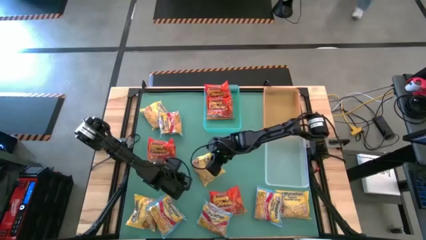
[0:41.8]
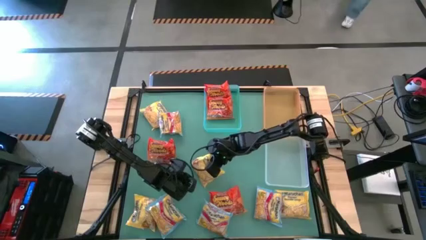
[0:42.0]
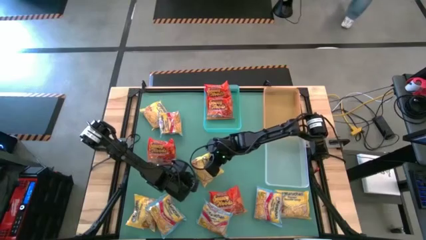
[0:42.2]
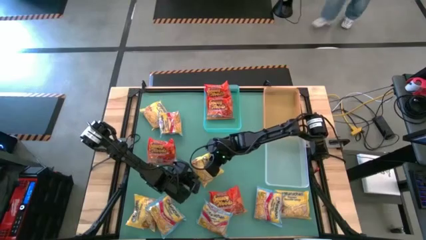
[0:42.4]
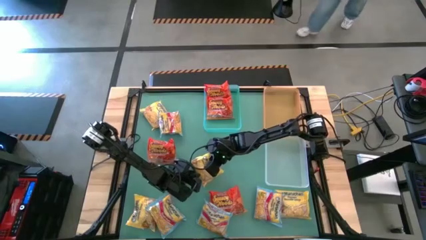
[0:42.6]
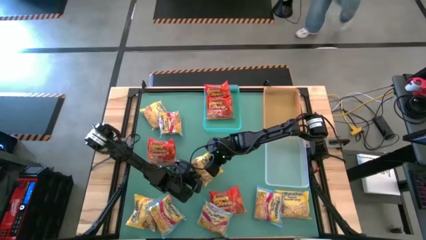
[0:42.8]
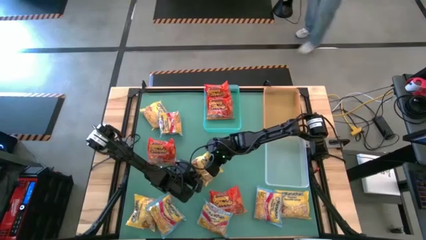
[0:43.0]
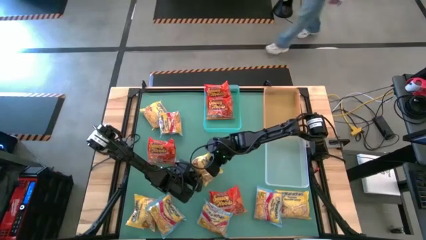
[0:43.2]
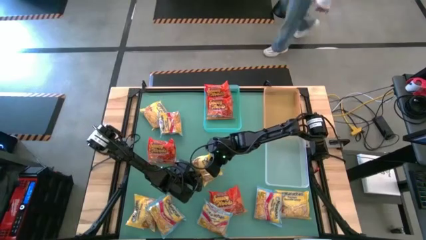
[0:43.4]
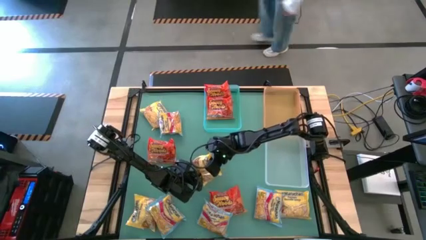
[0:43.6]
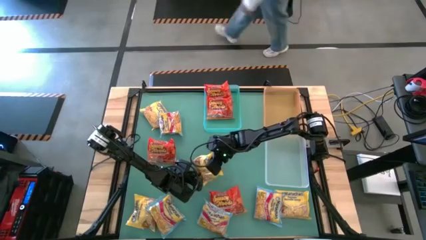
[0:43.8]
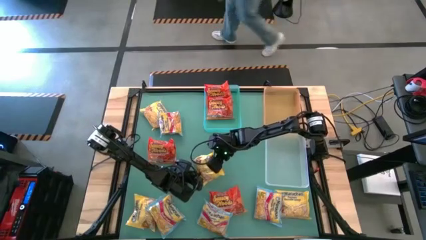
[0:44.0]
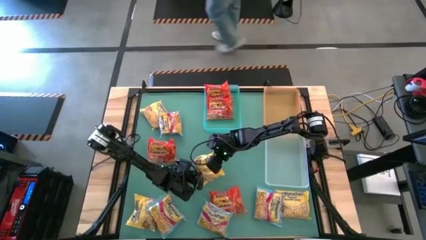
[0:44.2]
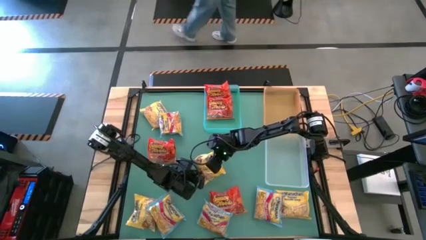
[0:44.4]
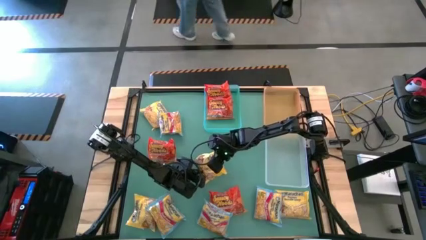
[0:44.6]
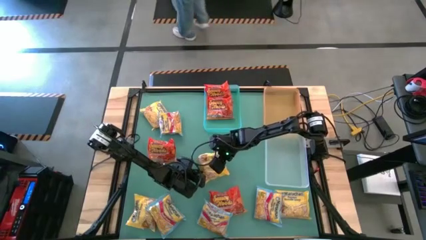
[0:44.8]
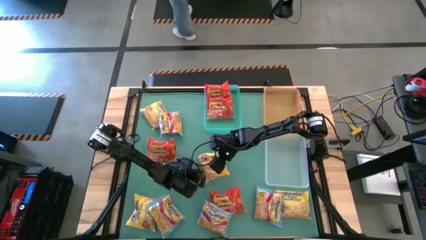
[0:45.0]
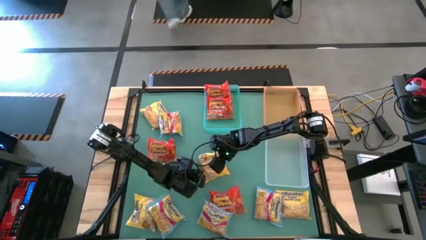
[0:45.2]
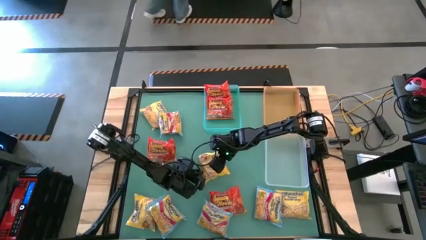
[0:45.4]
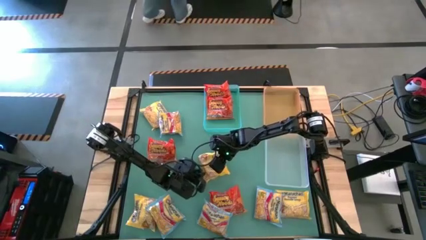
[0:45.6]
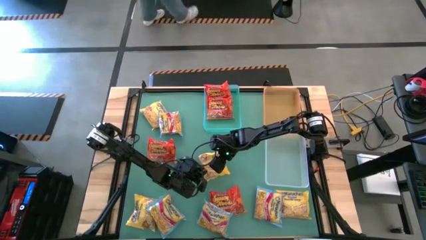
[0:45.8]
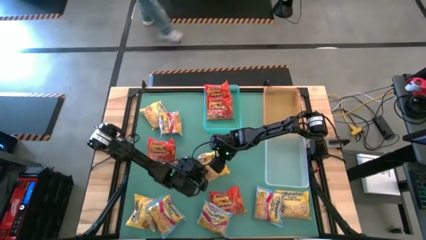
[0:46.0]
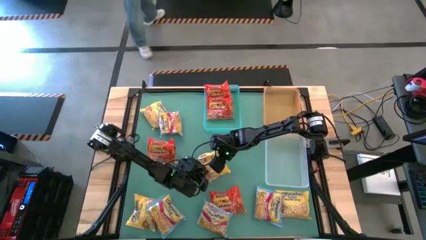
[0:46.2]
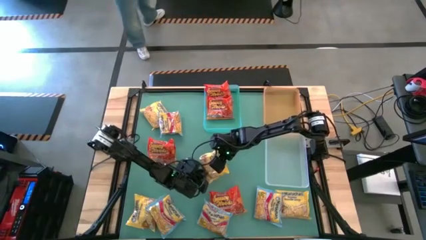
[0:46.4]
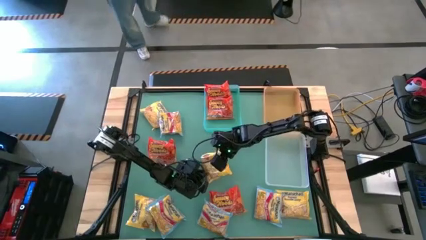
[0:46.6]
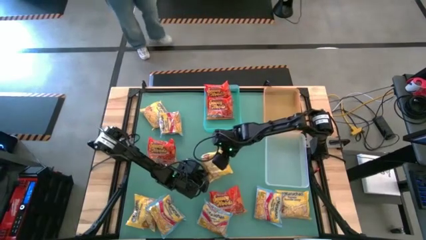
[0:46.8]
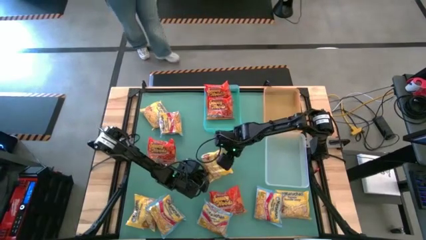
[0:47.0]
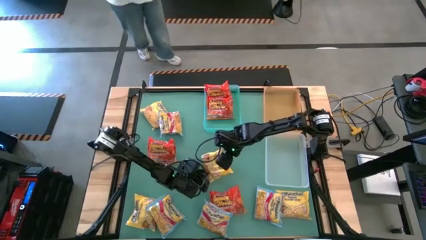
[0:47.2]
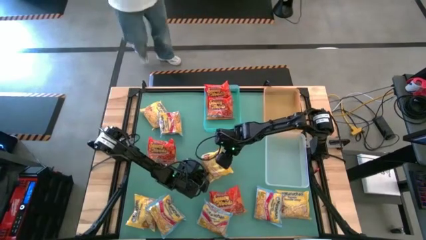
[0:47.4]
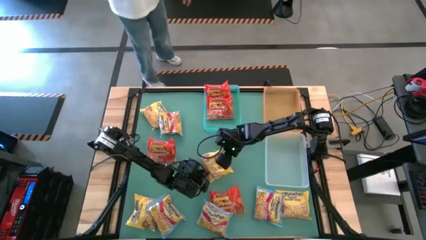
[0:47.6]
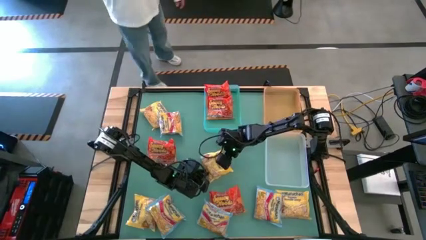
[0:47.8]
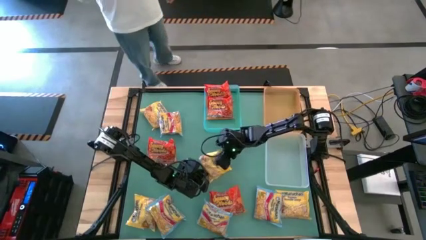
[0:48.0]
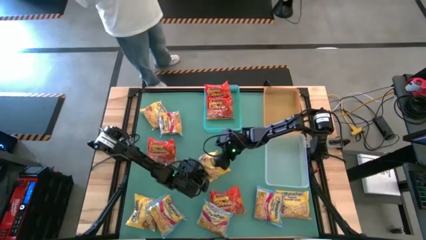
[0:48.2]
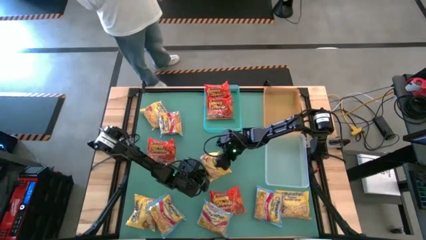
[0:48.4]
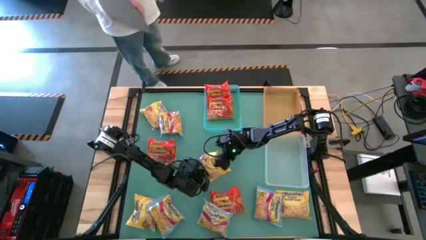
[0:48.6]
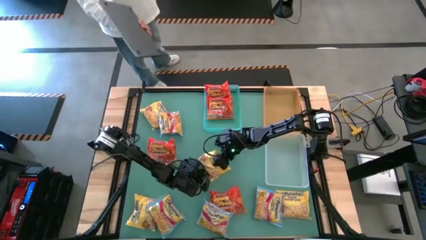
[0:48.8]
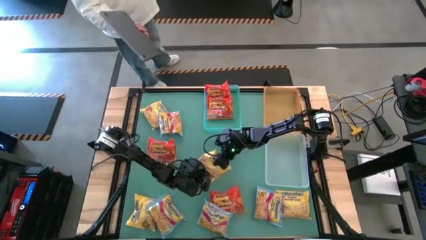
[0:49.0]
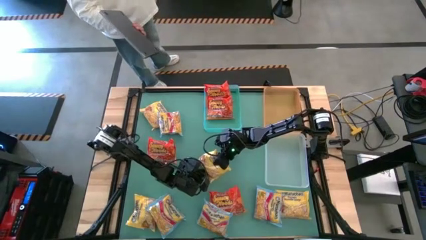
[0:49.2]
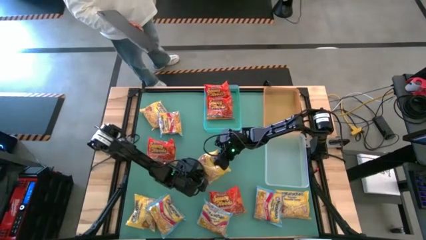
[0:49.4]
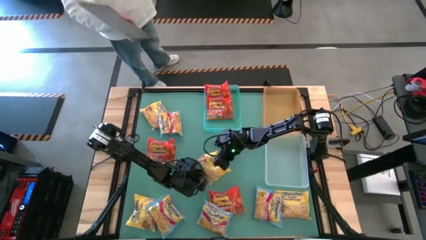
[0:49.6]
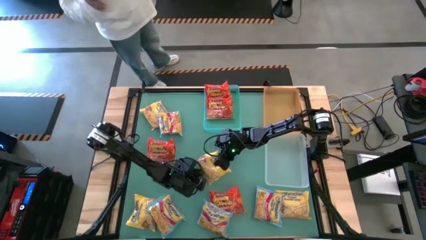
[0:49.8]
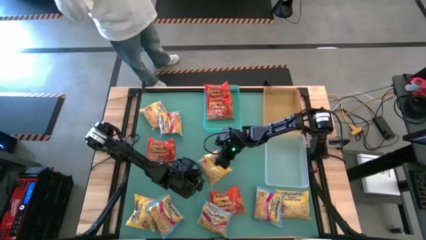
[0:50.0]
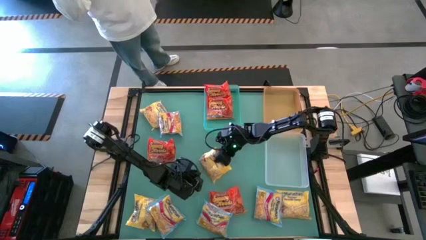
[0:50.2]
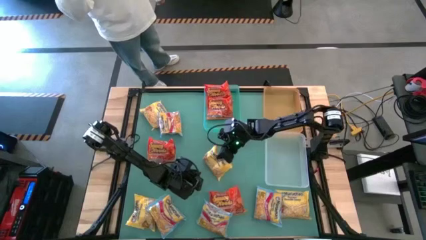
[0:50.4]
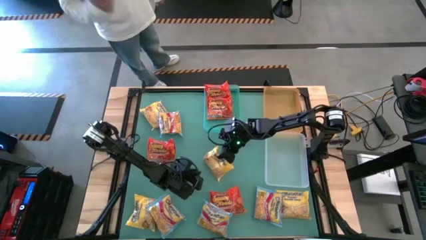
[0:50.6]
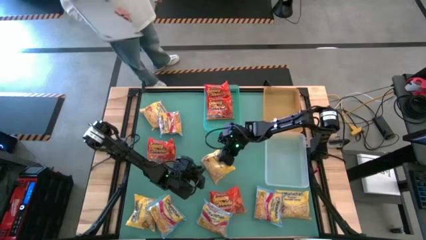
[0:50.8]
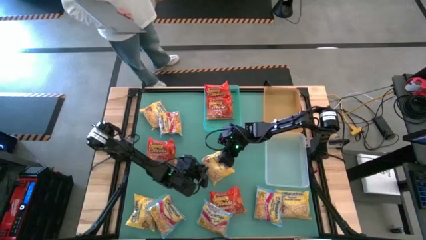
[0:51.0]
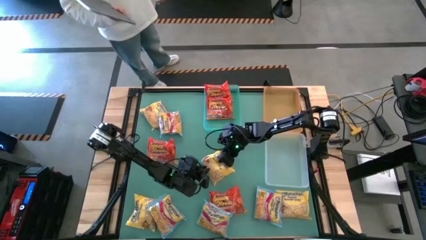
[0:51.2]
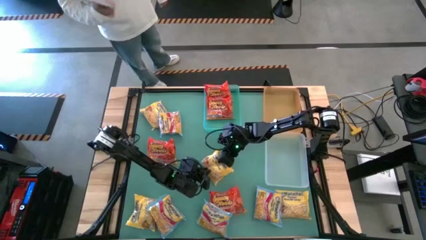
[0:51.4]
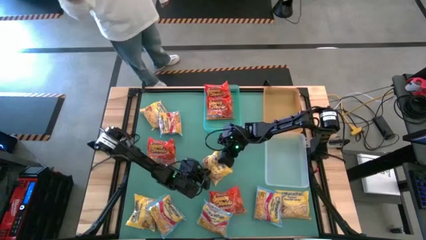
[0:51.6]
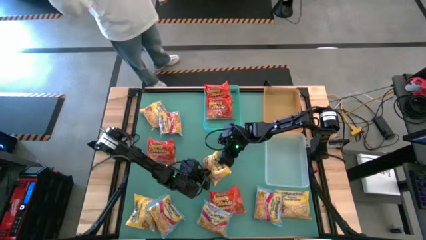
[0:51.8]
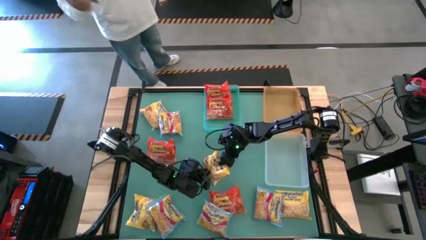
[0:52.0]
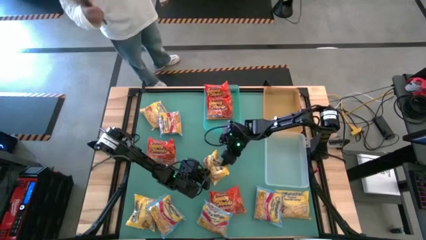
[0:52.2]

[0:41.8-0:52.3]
Task: Sort Maruchan noodles
Put the yellow noodle pack into the orange bin

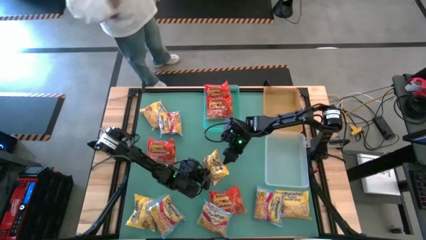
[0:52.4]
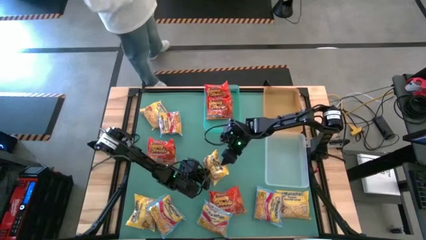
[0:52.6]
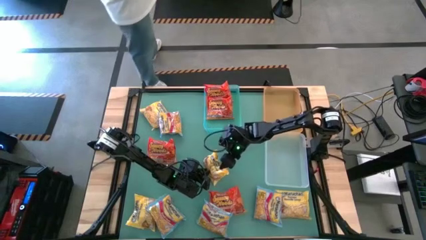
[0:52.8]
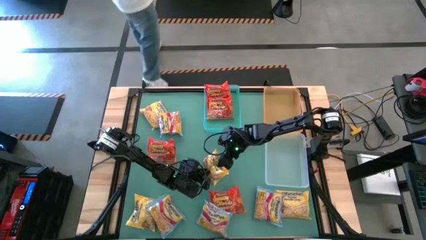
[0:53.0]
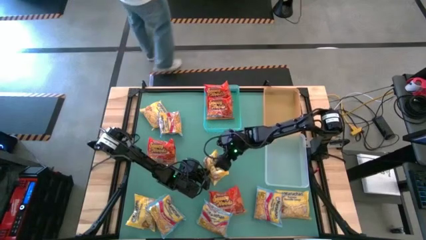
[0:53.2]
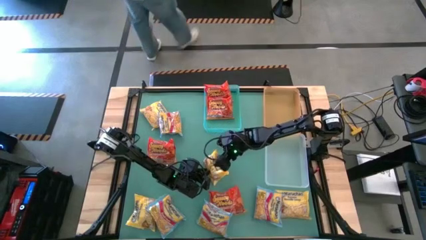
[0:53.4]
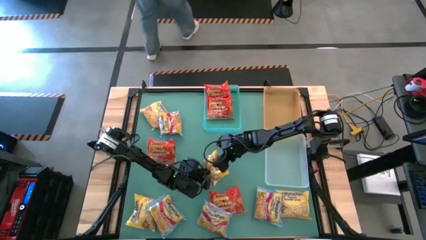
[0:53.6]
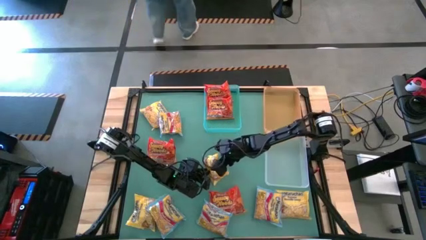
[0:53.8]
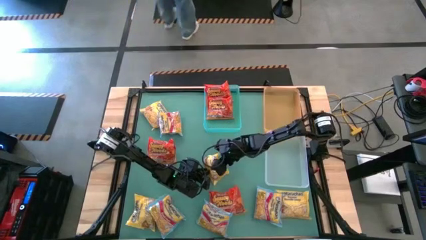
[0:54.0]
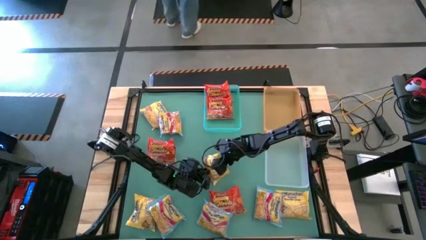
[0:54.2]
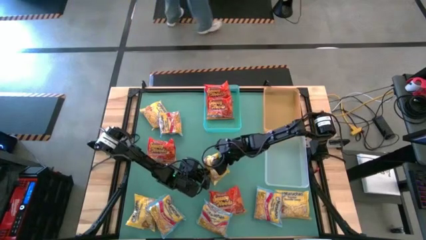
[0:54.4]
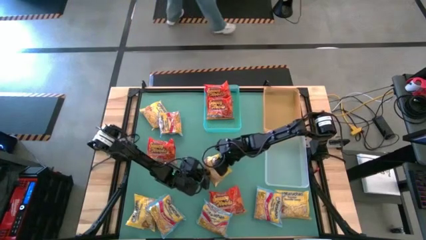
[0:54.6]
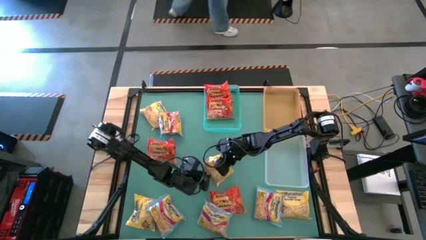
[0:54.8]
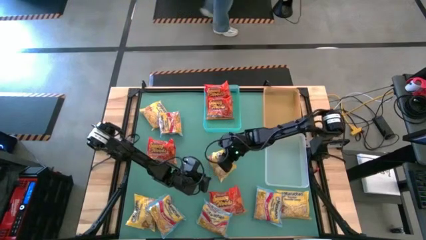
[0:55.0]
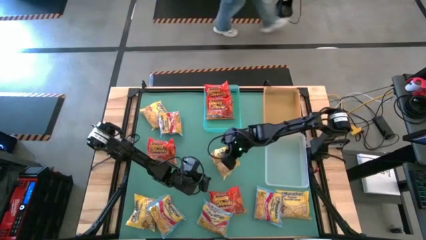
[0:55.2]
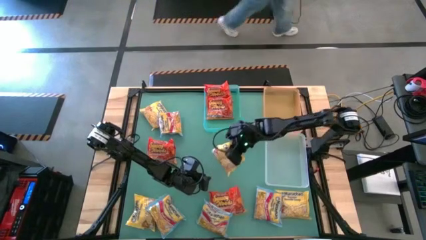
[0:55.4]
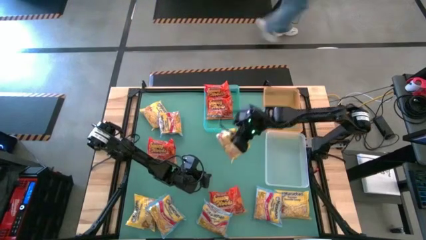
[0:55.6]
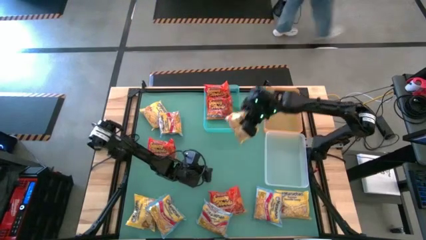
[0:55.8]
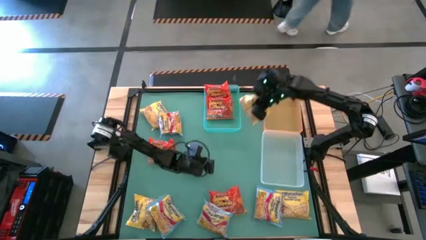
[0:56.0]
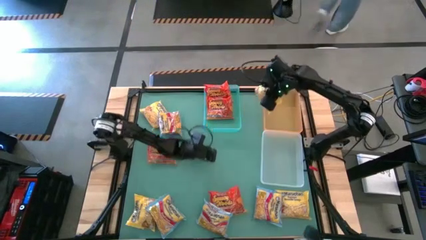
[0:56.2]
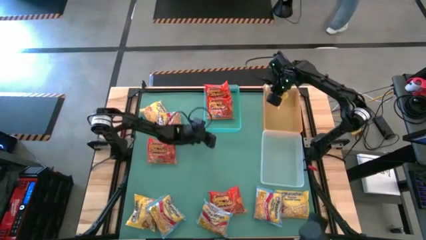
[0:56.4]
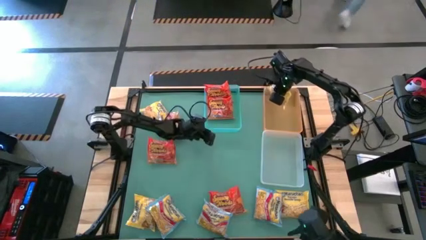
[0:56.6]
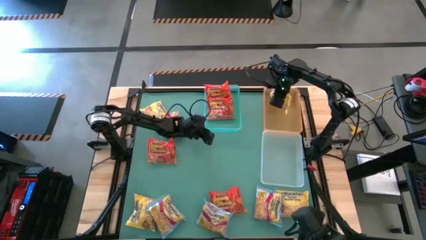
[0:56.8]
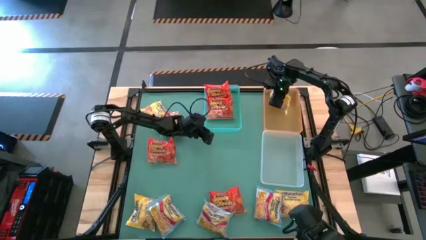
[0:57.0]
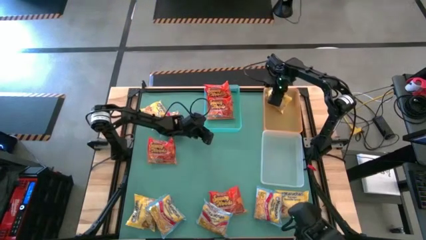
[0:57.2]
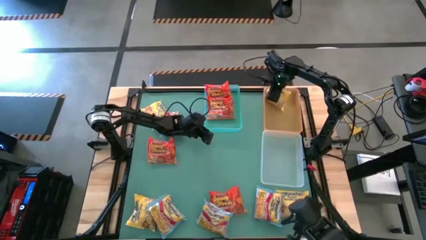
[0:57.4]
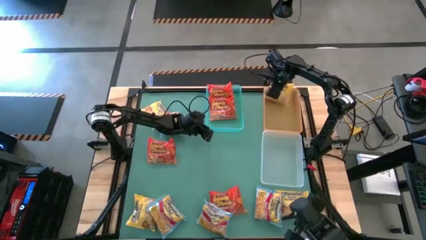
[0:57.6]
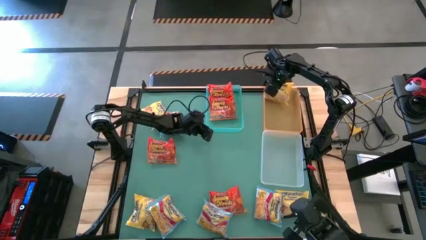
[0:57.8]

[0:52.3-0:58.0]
Put the yellow noodle pack into the orange bin
